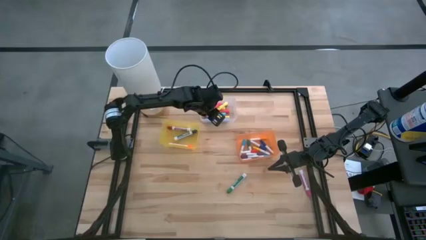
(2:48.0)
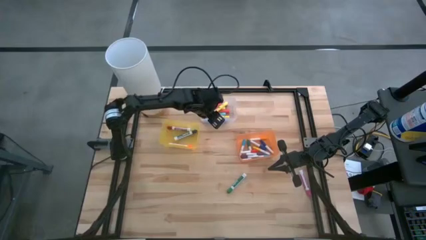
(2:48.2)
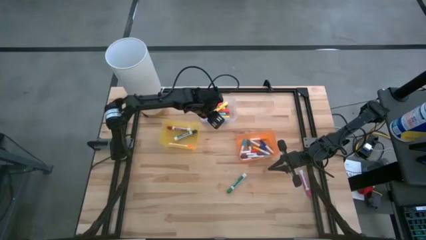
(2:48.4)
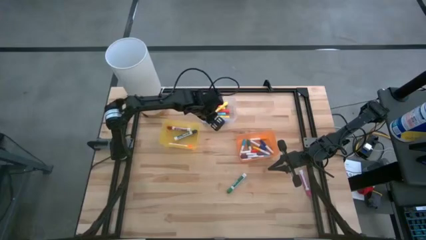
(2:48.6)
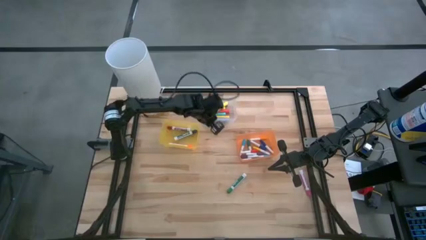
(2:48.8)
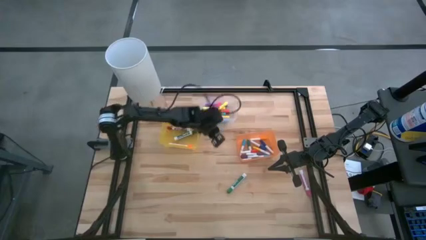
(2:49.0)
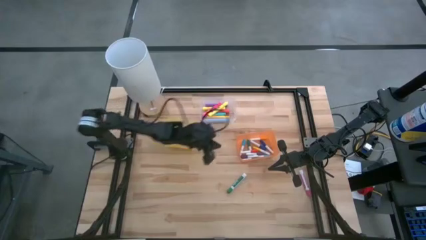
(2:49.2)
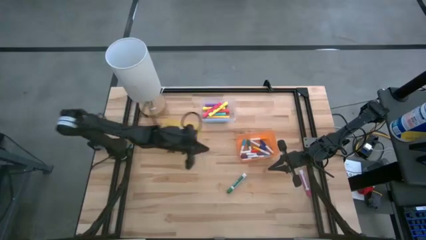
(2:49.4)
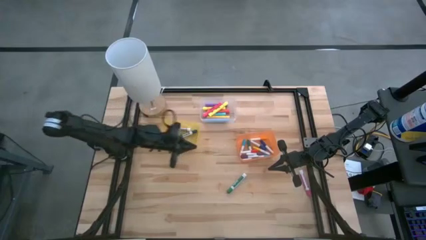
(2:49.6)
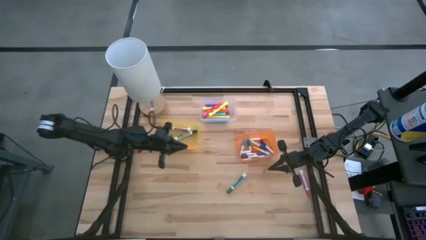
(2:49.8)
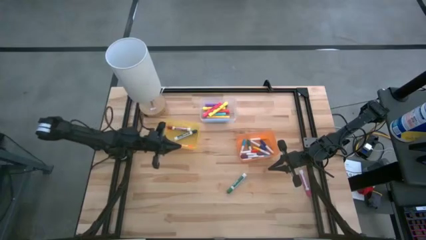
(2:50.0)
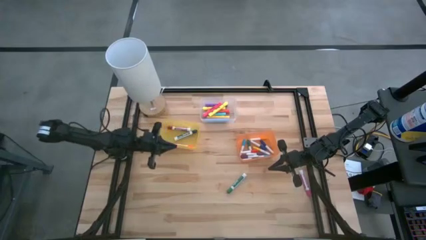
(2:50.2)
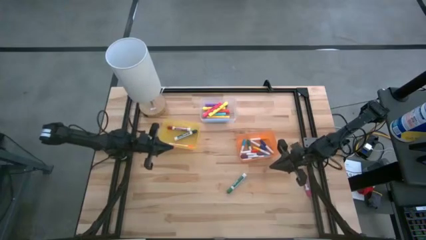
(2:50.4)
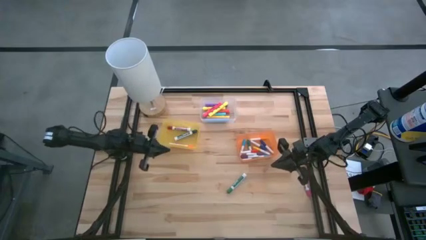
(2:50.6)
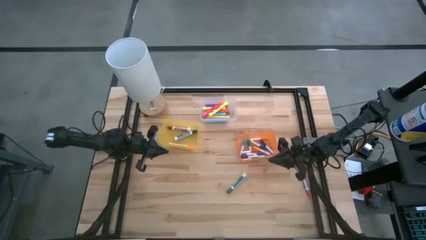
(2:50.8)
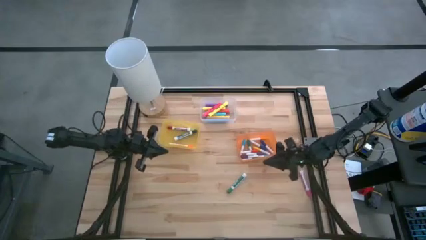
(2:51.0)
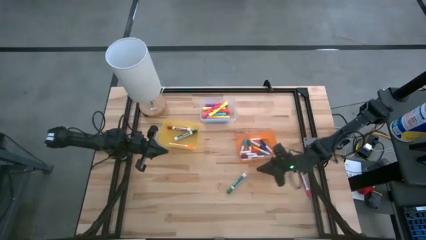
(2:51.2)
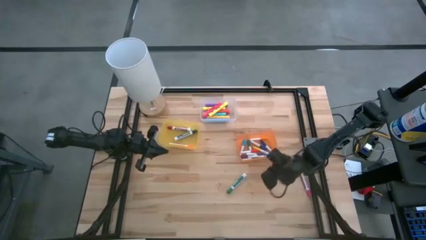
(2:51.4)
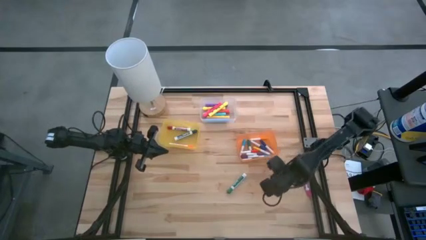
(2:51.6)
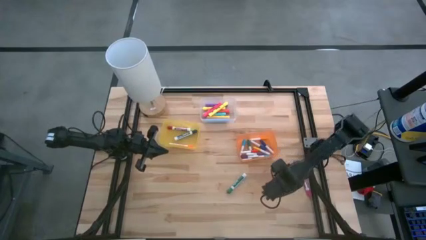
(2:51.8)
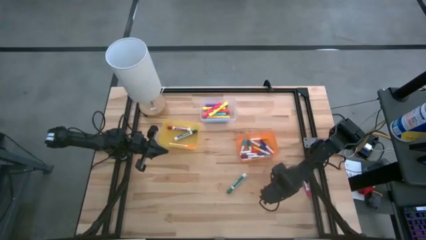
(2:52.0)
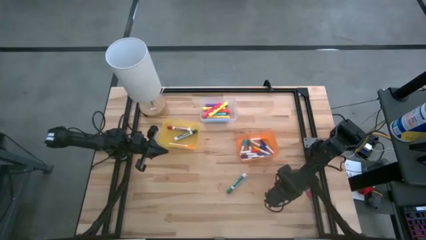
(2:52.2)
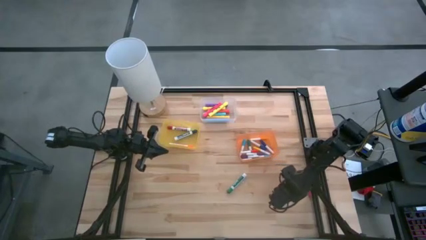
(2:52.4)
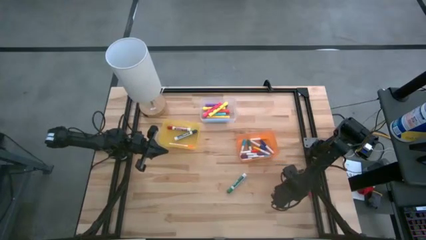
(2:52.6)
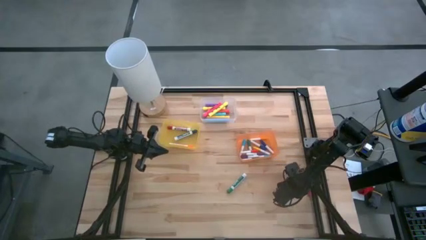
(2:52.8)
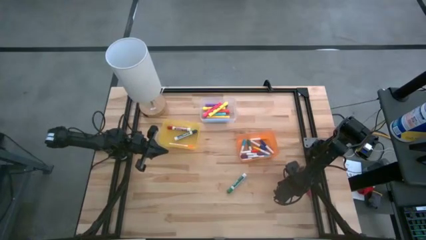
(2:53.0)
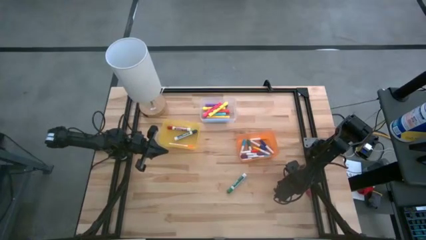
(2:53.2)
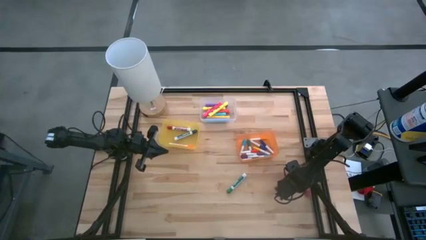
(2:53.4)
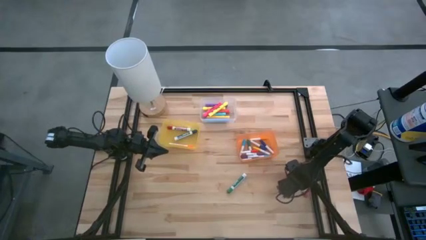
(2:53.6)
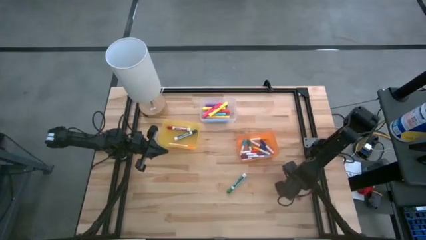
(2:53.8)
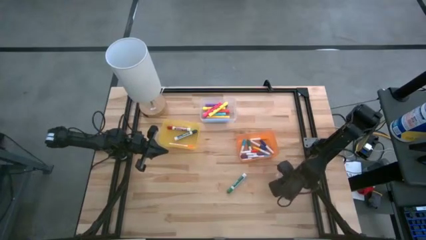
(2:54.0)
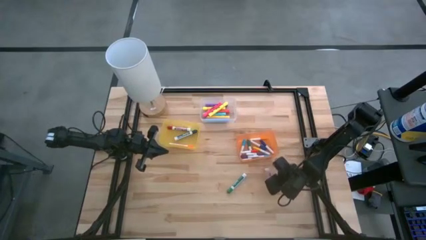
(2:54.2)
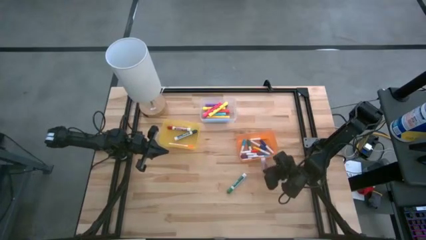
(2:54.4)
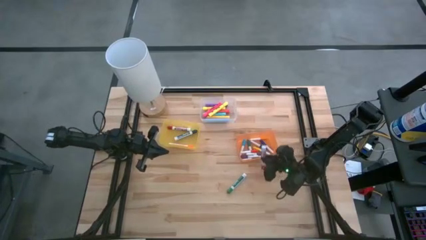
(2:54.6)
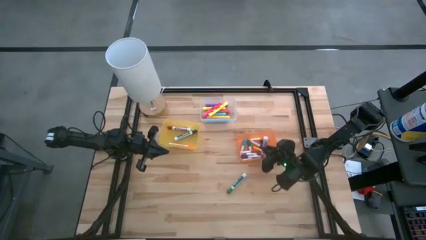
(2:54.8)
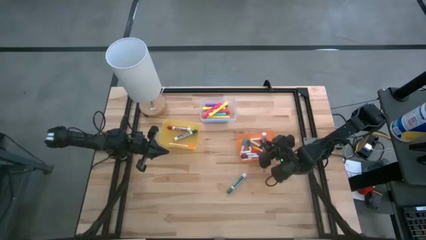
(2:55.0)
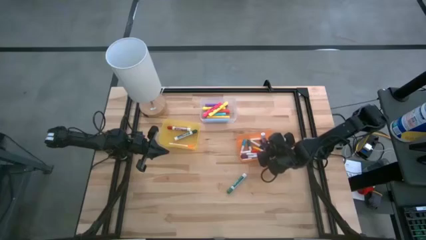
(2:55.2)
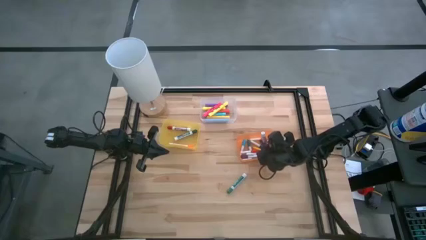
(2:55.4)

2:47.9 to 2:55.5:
Task: Pick & Place Markers
Put the pink marker pen into the transparent yellow bin

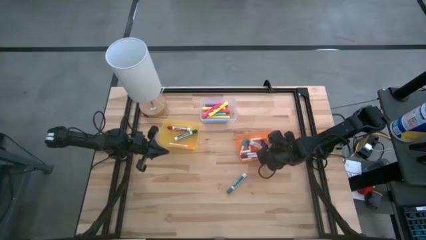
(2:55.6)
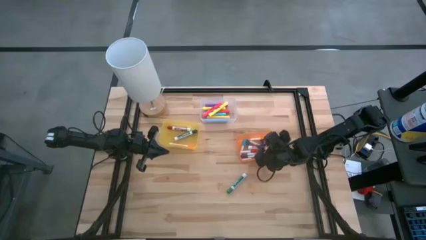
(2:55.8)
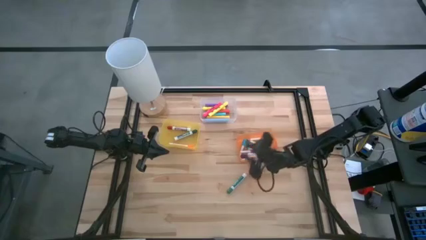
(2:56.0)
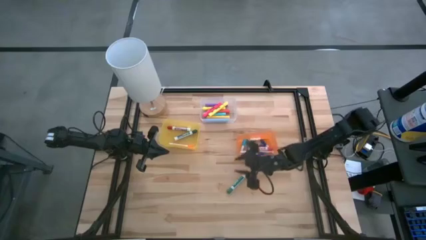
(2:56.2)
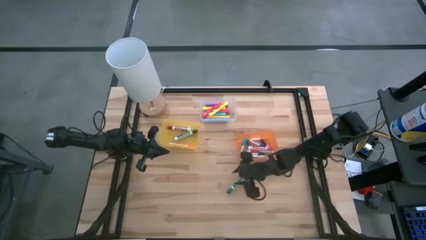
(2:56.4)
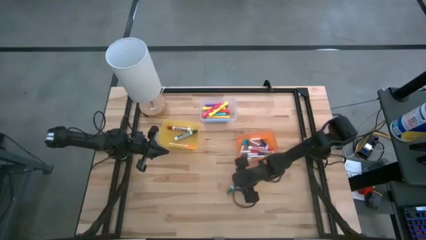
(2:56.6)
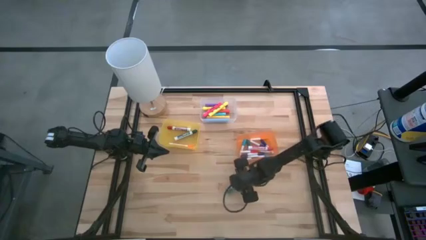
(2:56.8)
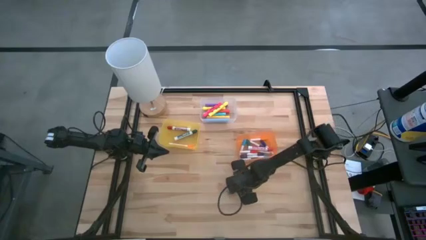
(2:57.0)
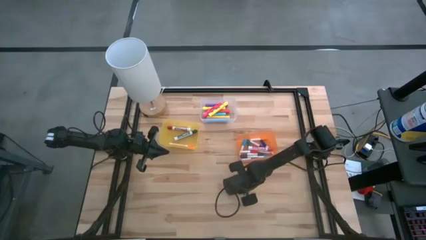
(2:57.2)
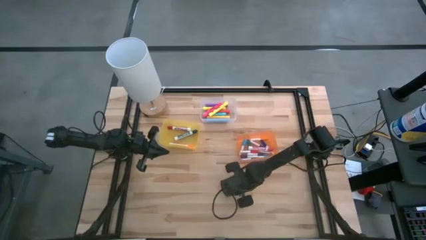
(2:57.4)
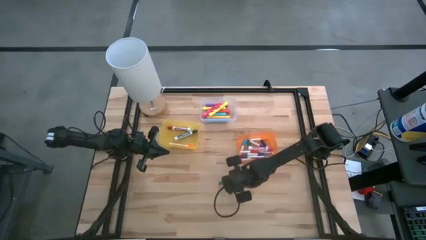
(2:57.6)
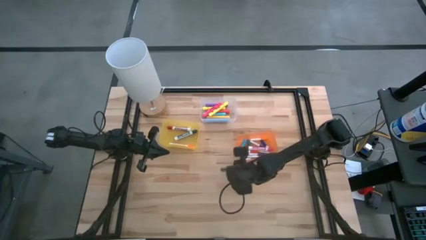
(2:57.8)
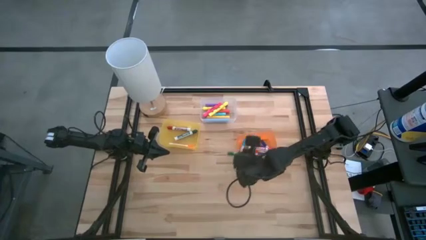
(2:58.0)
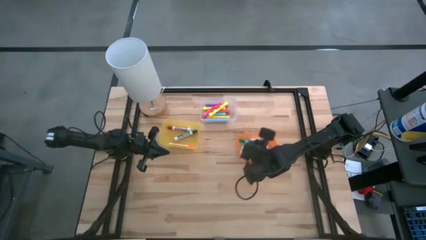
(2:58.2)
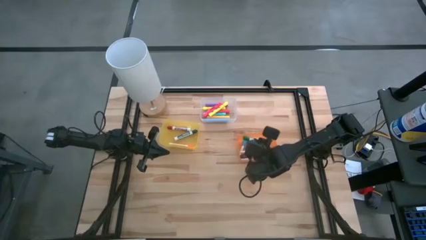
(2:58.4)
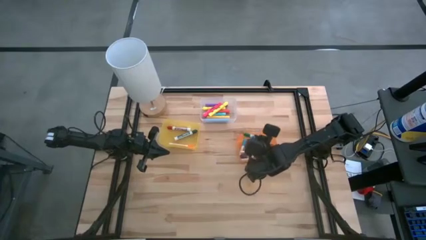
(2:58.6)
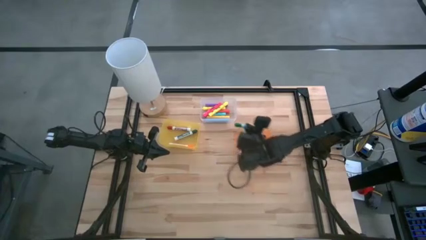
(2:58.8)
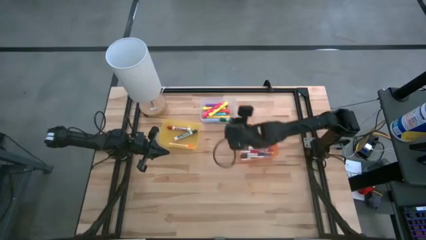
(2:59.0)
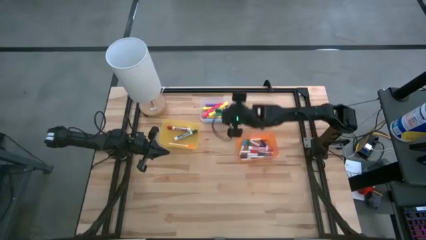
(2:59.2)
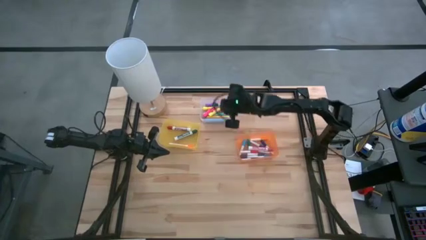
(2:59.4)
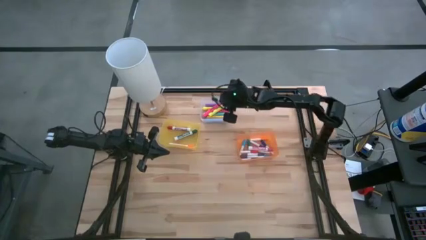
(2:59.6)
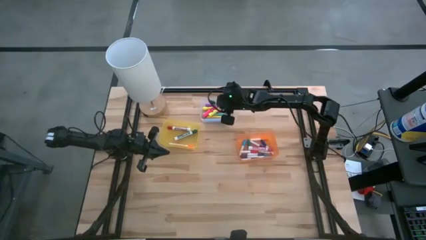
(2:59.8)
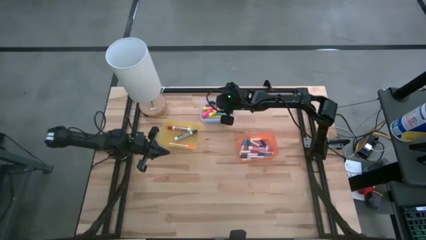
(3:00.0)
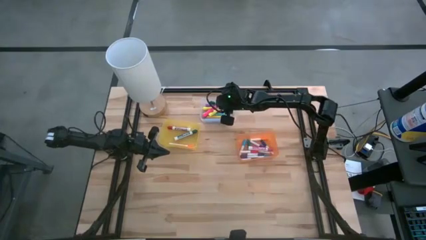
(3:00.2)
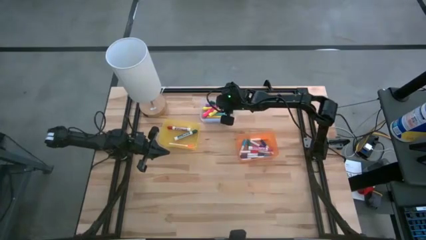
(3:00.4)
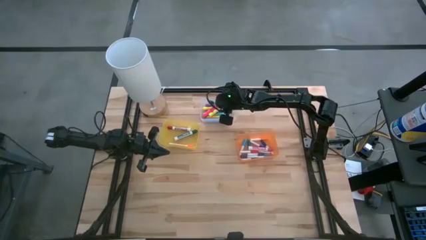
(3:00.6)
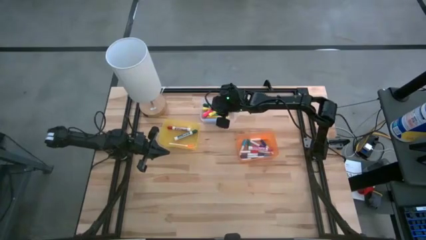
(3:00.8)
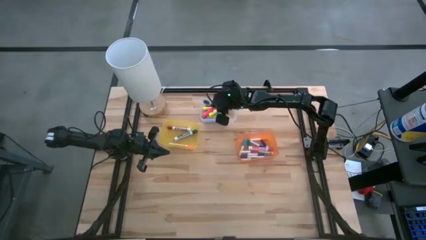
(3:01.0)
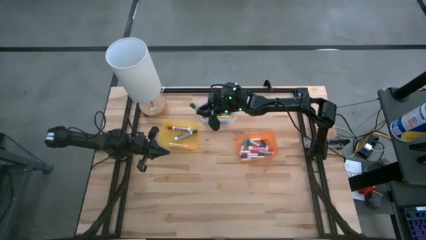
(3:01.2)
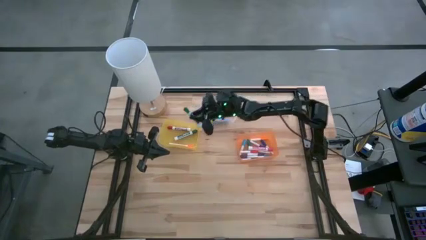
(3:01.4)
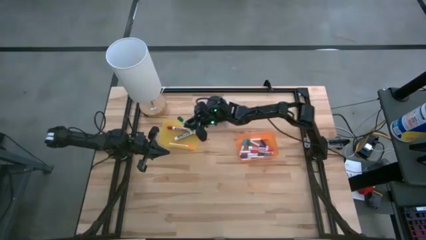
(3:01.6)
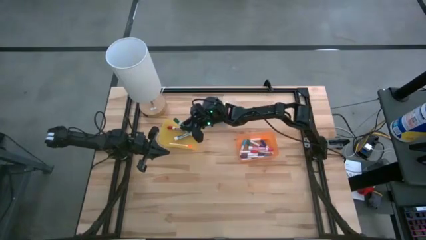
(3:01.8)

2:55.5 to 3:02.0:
Put the green marker pen into the transparent yellow bin

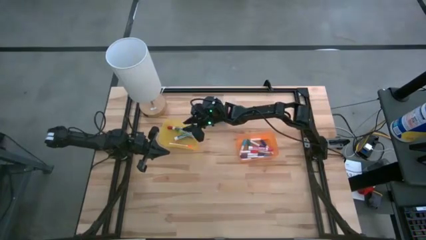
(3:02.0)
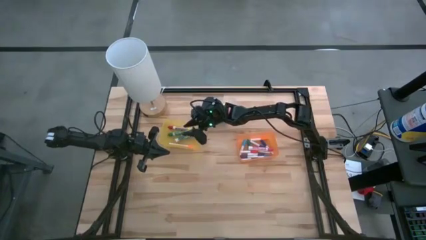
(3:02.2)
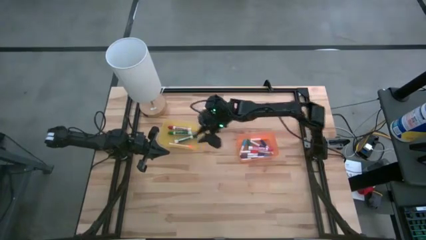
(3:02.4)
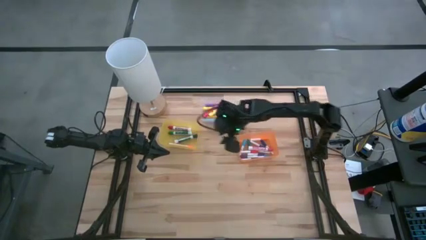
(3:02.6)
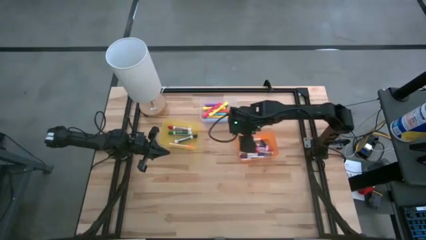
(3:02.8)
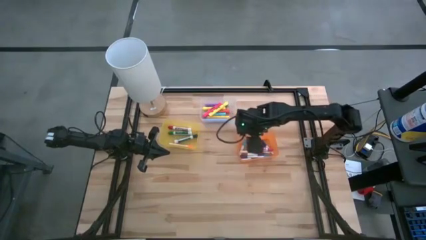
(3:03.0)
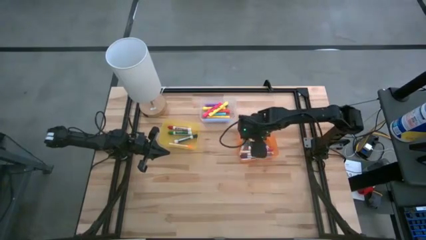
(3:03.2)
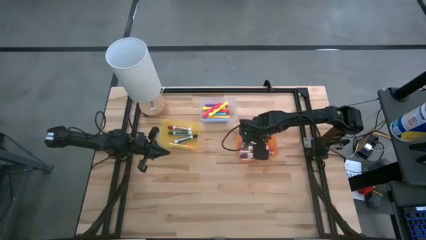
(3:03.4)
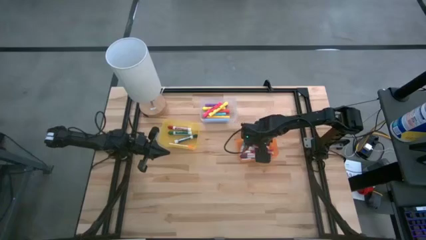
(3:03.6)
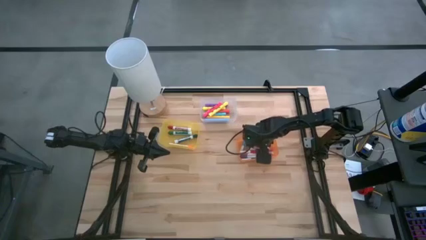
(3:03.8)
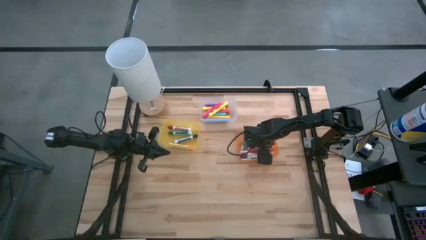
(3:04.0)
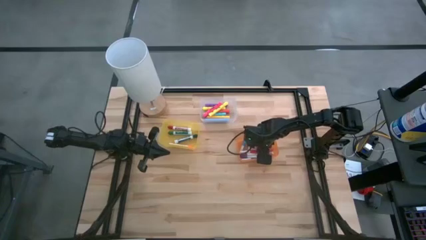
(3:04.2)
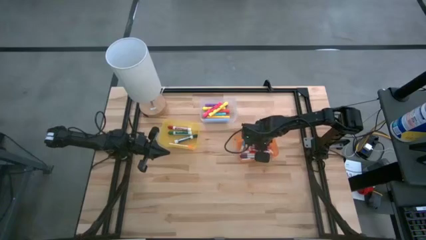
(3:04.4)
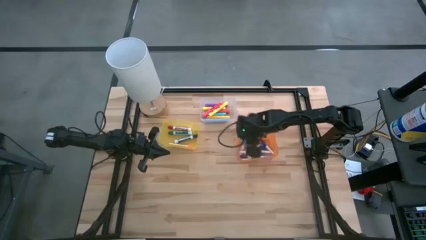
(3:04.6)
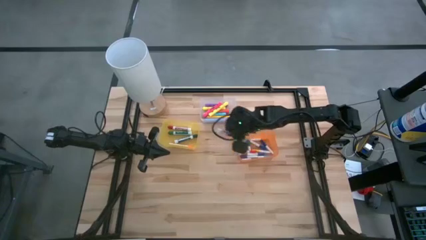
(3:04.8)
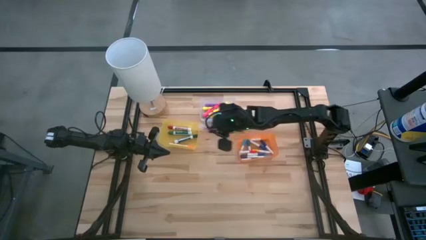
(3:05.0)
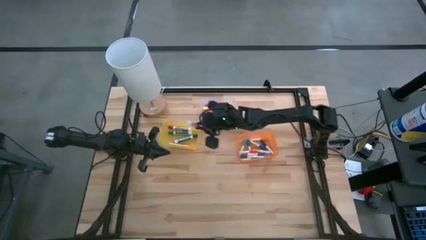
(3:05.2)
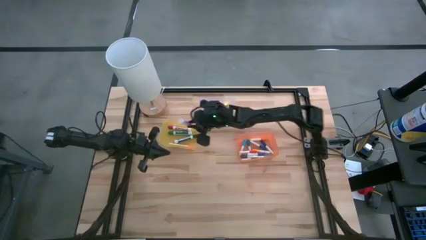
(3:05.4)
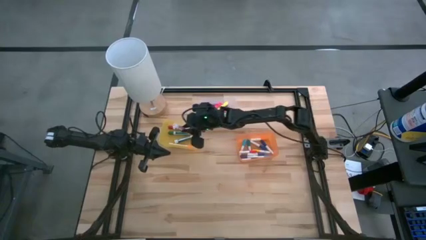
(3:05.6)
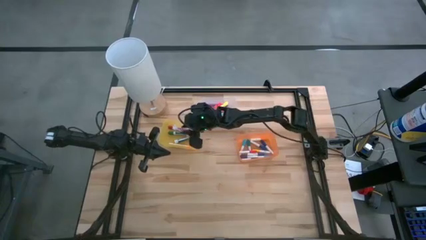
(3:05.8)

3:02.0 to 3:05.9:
Put the pink marker pen into the transparent yellow bin
